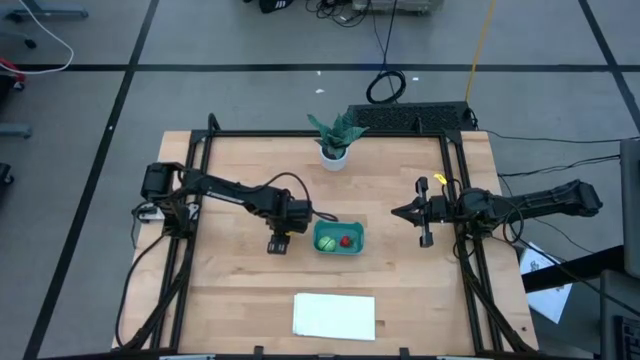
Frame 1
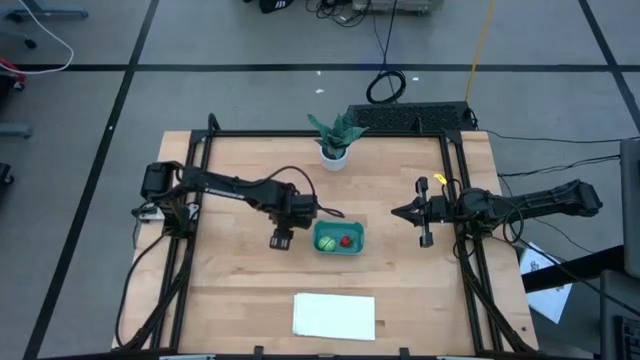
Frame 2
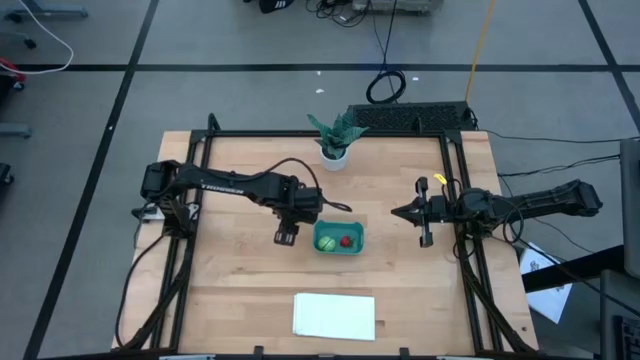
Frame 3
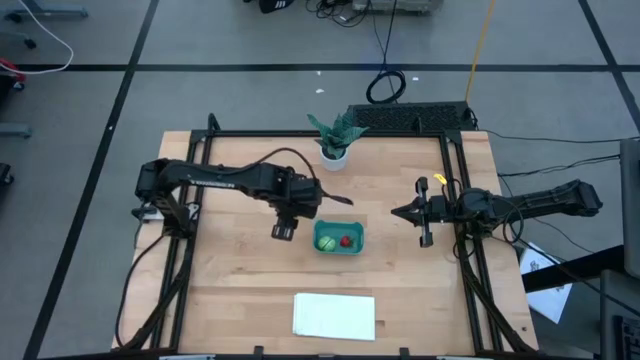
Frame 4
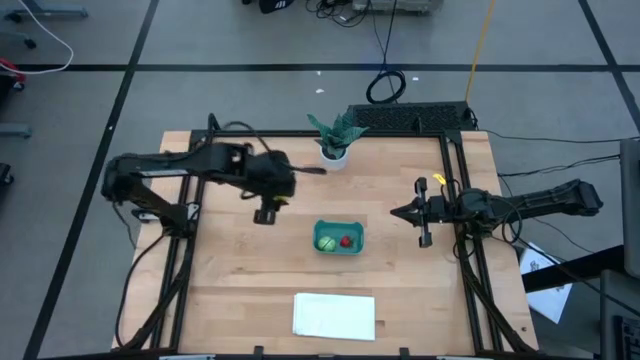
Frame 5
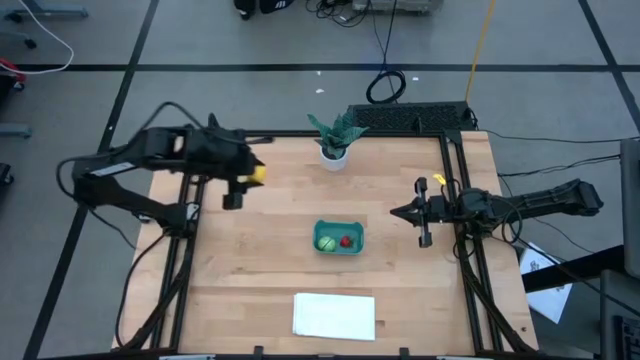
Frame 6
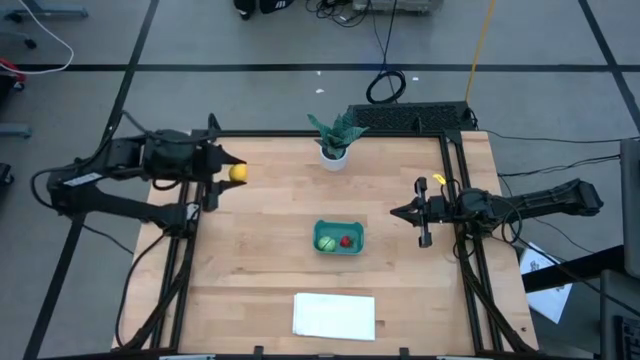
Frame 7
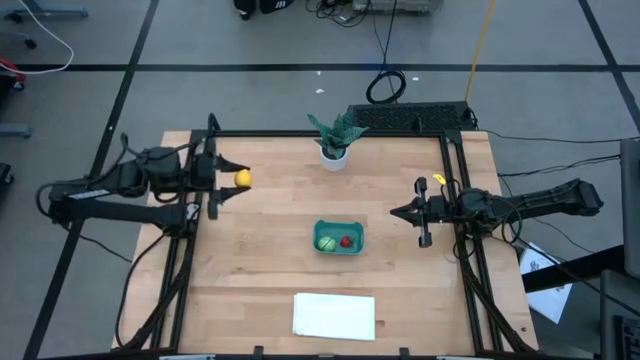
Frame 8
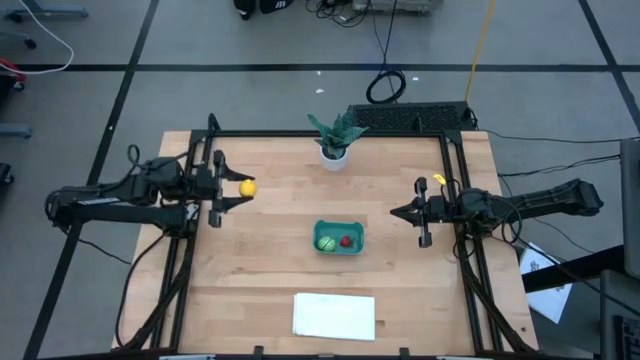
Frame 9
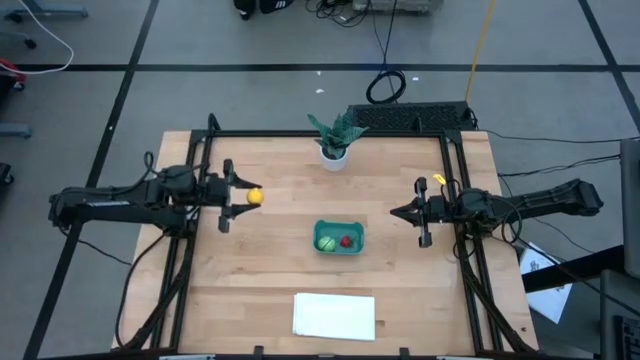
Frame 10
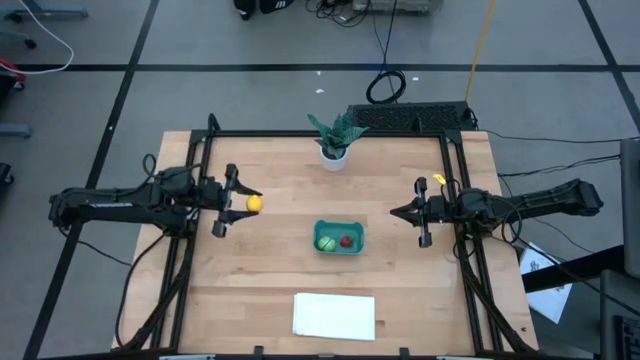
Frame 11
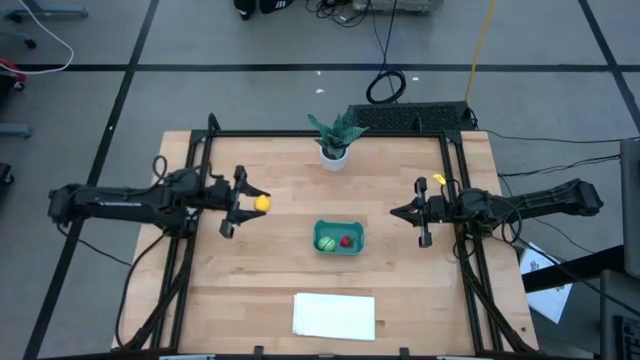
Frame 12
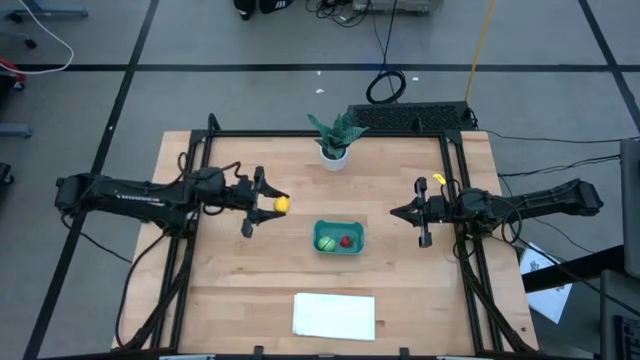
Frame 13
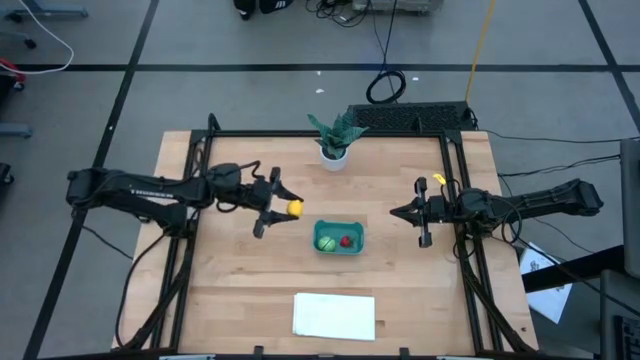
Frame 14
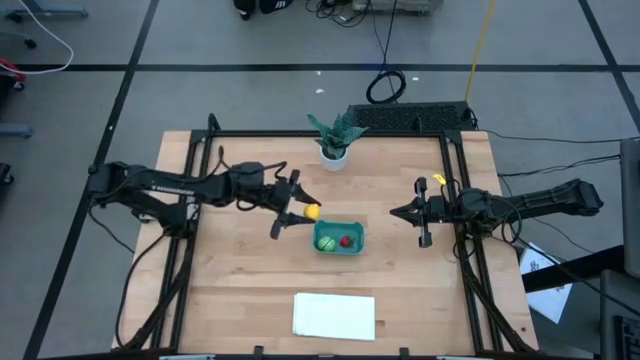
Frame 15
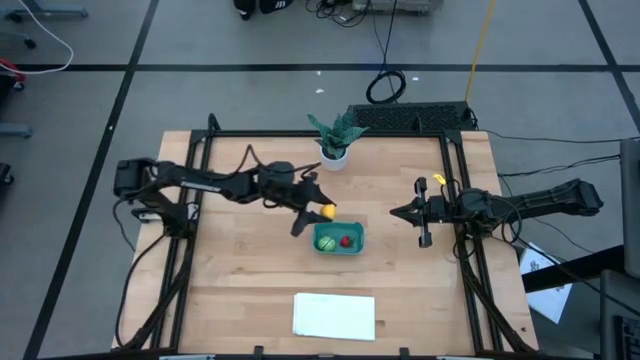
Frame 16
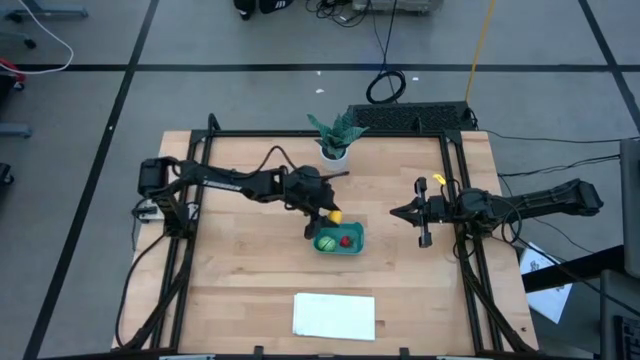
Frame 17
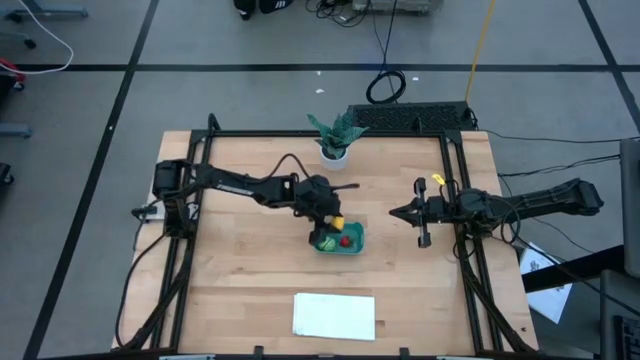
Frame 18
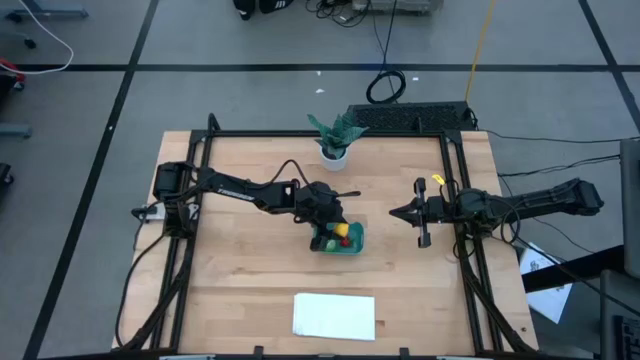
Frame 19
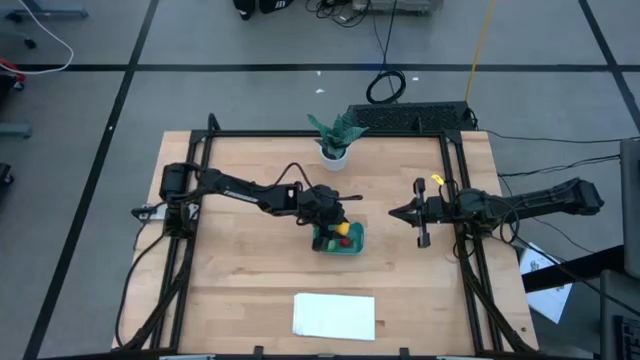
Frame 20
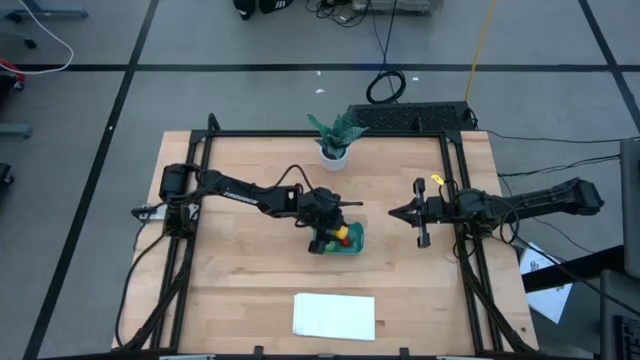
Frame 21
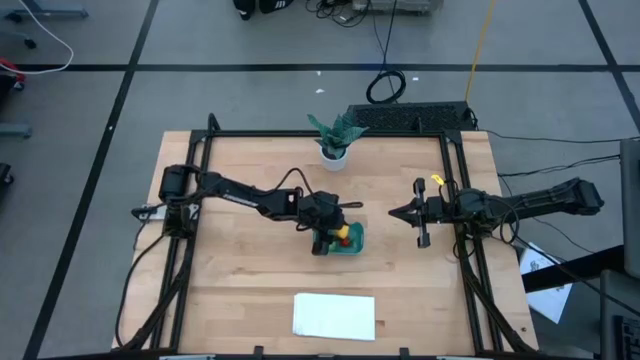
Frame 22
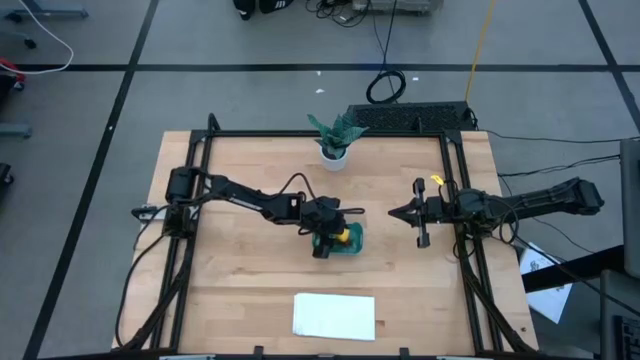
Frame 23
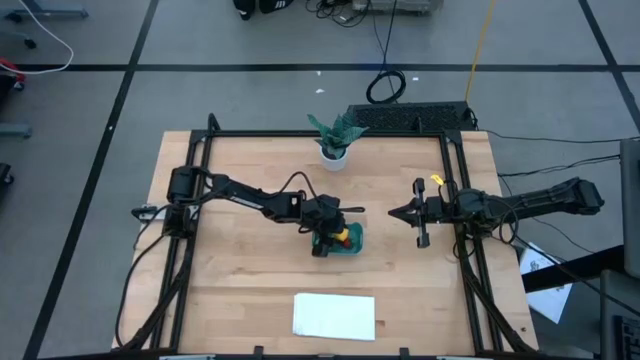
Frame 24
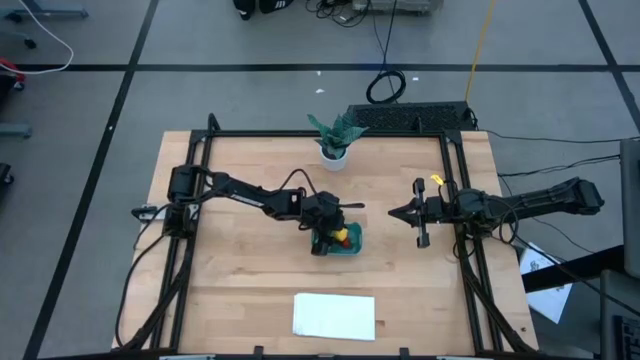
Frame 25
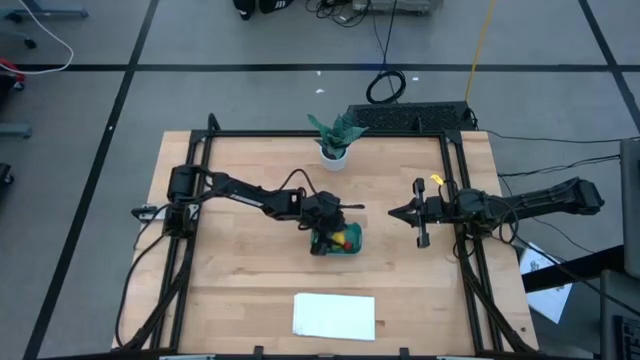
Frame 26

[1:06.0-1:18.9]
Task: Pick and placing Produce into tupperware
Put the lemon into the green bin

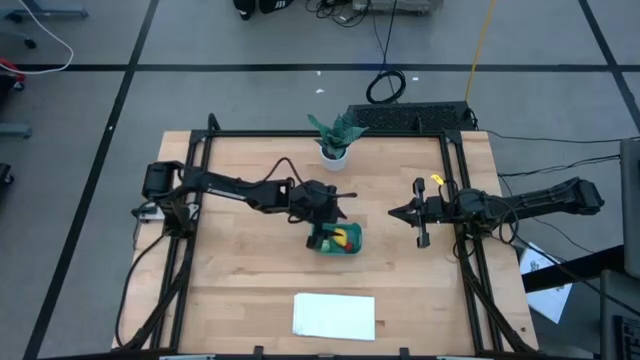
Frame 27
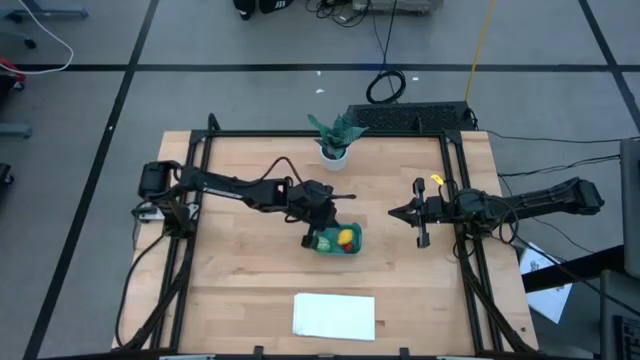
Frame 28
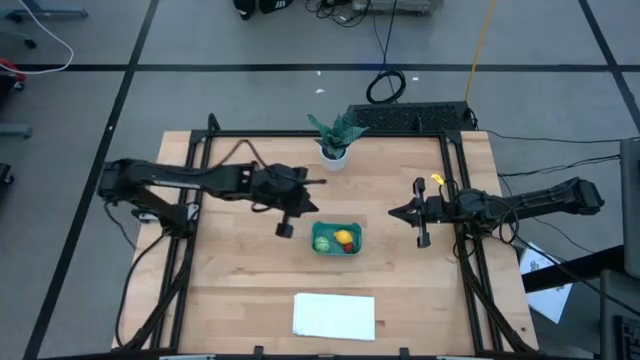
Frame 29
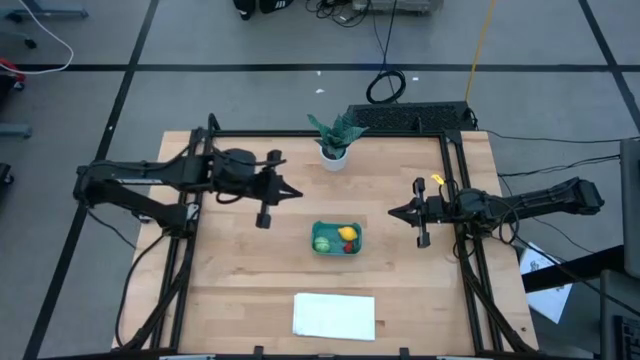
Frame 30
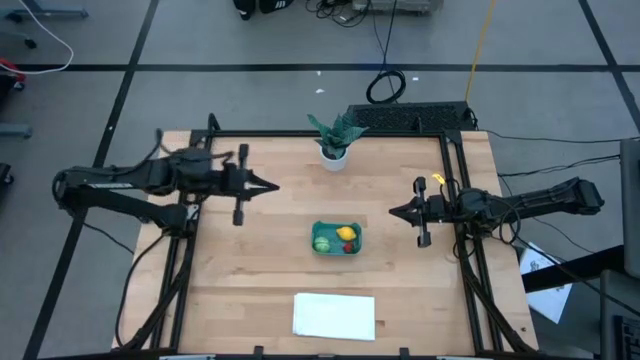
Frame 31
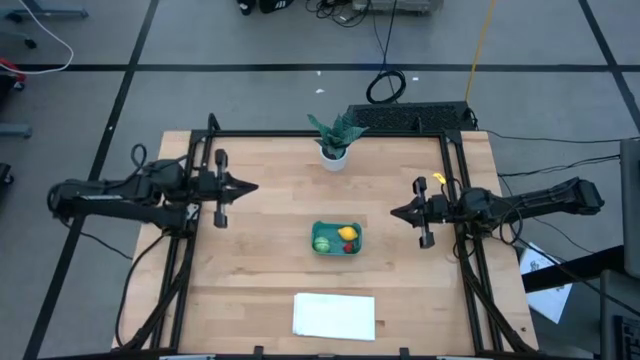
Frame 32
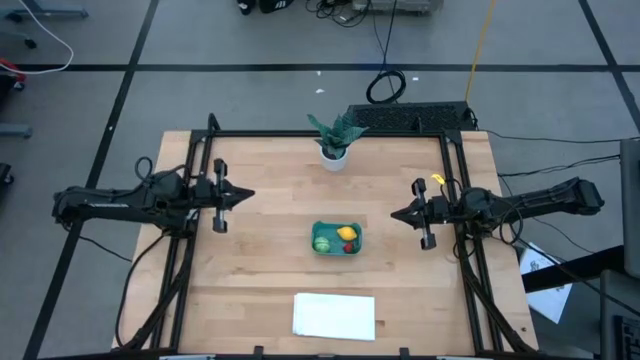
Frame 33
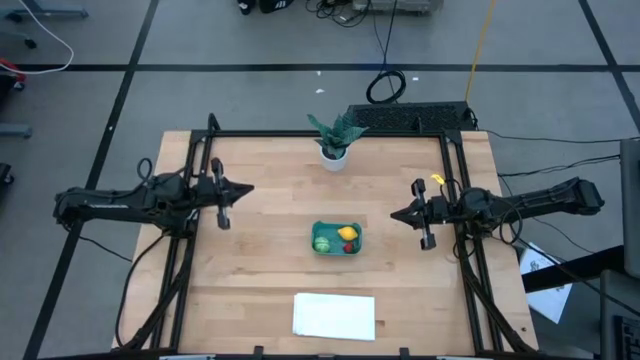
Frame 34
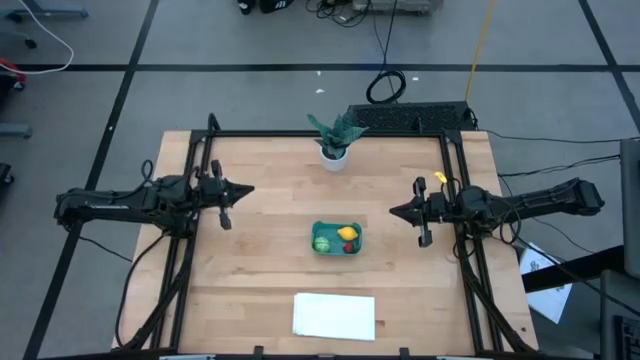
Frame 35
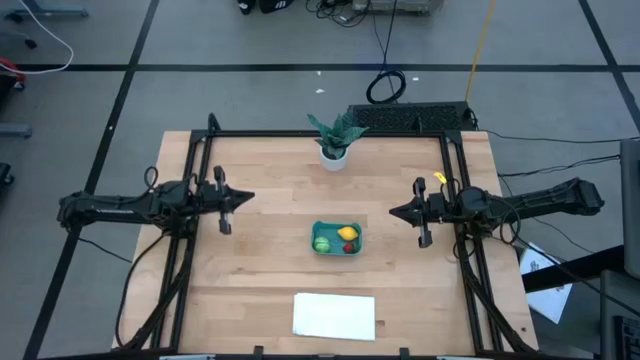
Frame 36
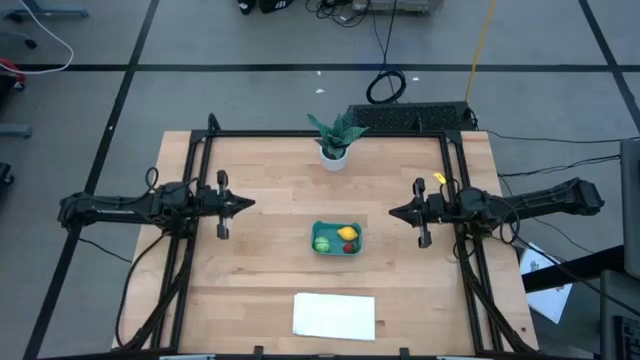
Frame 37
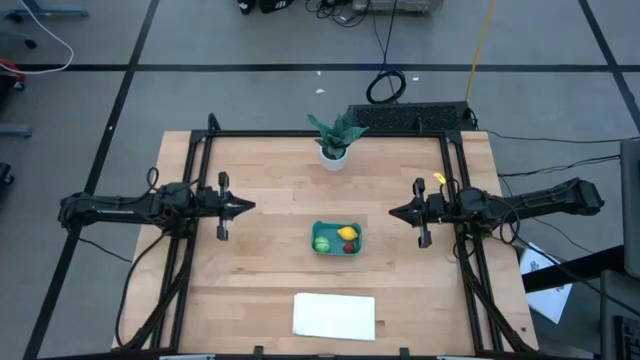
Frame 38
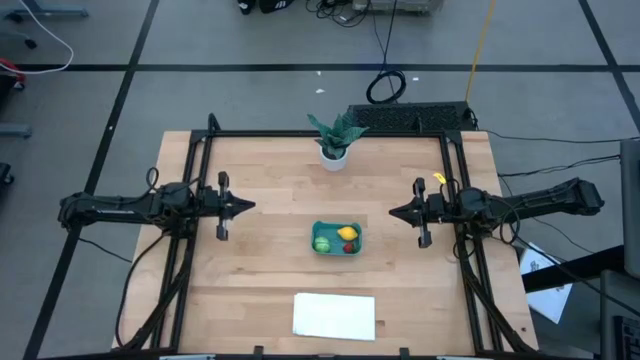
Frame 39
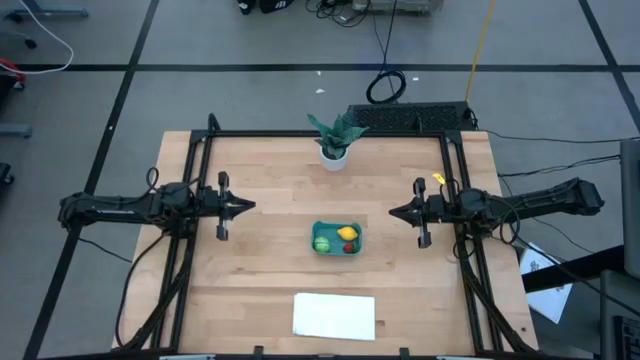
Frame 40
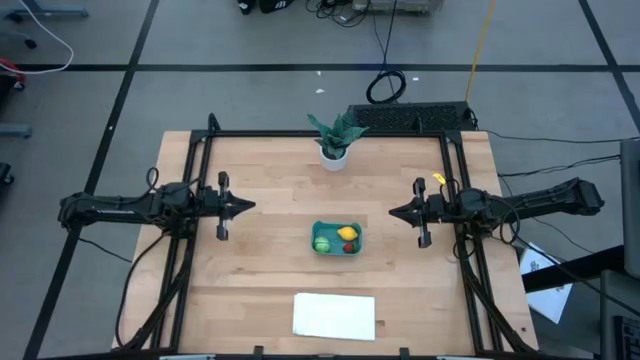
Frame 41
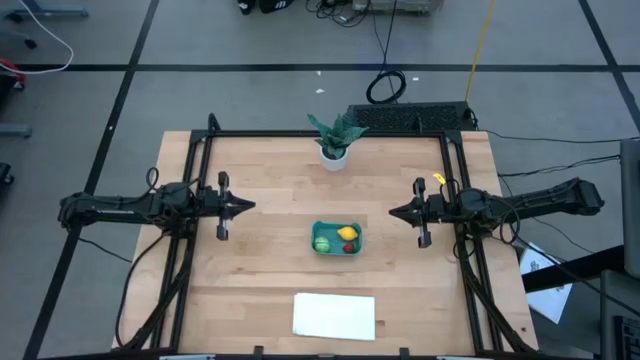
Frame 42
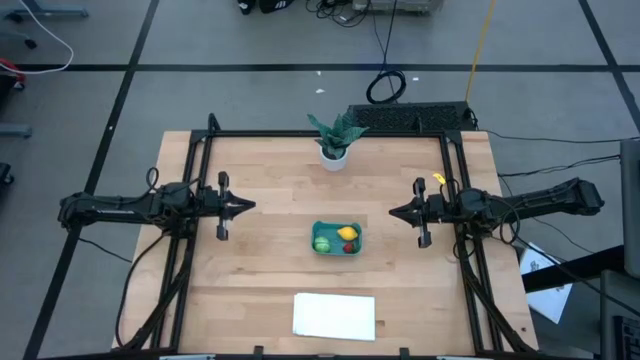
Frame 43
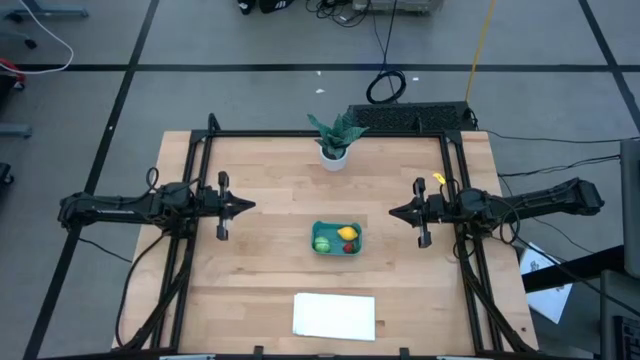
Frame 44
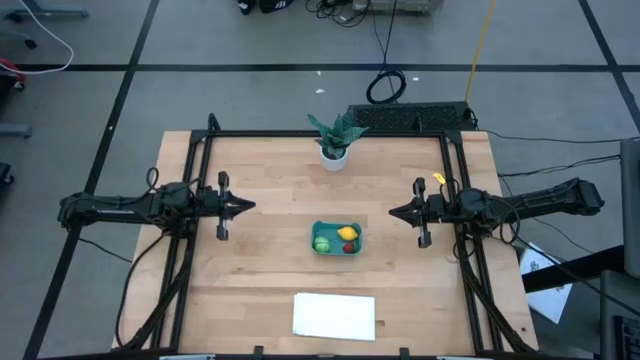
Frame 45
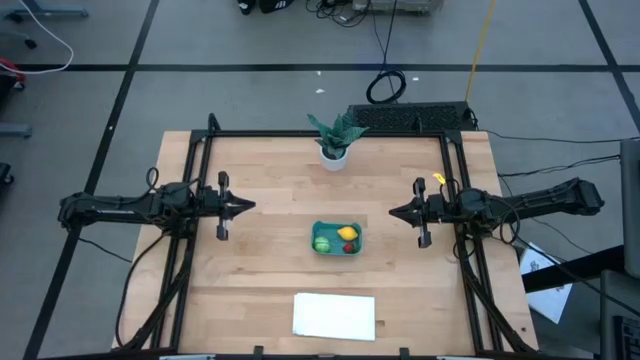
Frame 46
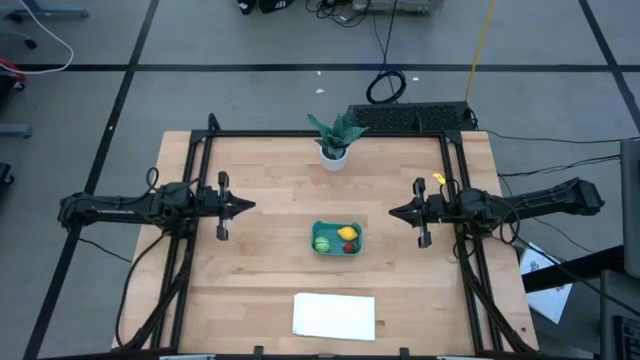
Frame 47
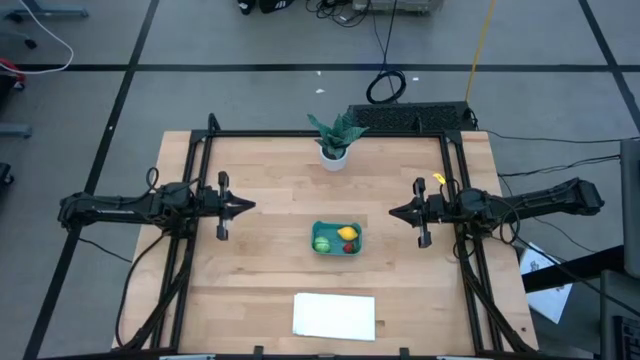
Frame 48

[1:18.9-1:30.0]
Return to Home Position
